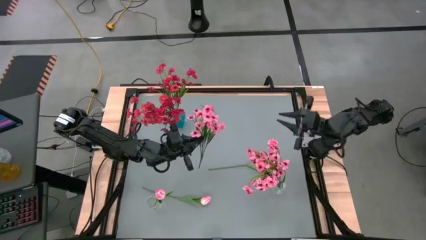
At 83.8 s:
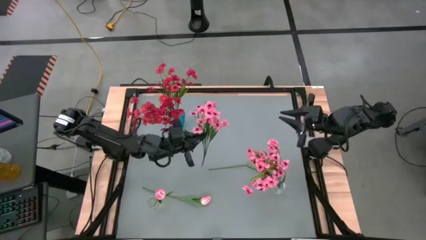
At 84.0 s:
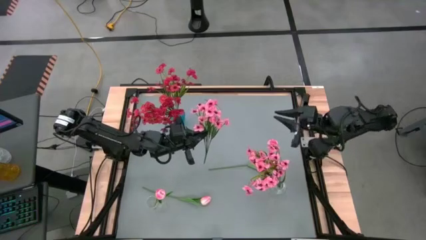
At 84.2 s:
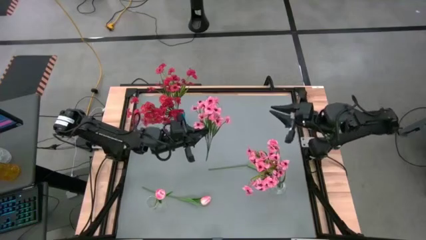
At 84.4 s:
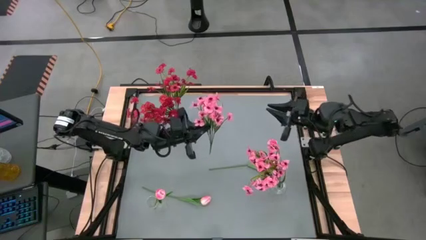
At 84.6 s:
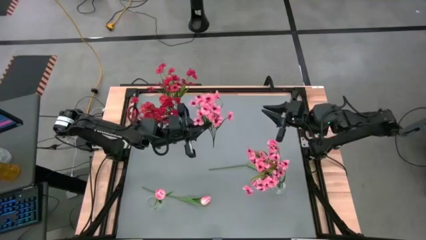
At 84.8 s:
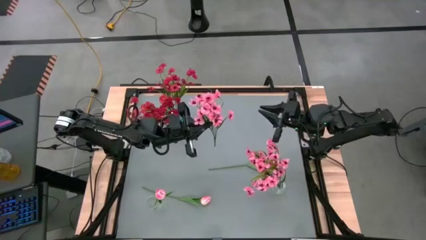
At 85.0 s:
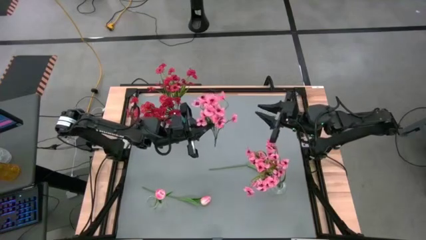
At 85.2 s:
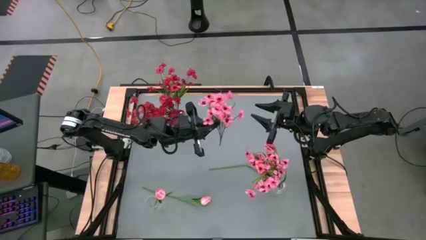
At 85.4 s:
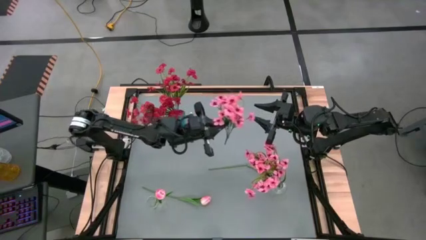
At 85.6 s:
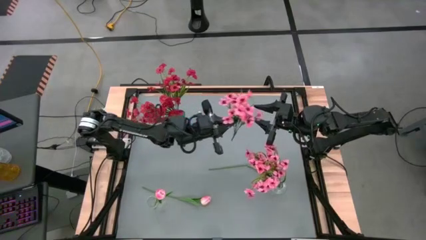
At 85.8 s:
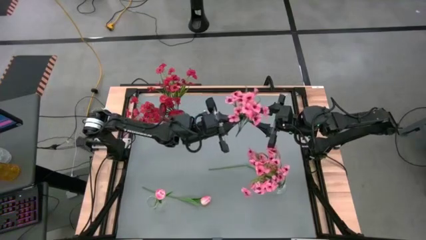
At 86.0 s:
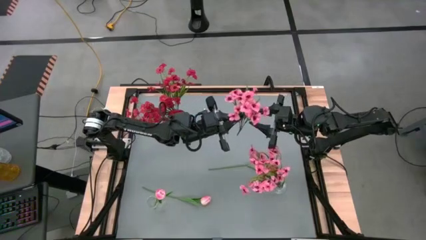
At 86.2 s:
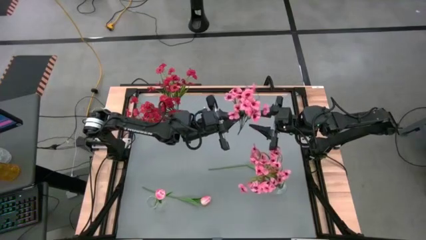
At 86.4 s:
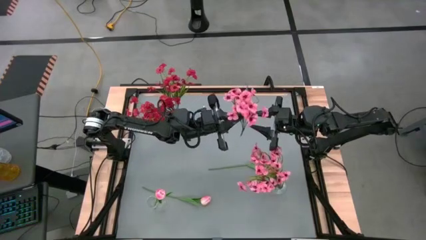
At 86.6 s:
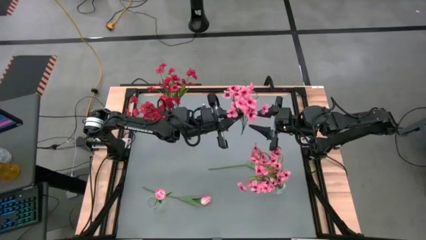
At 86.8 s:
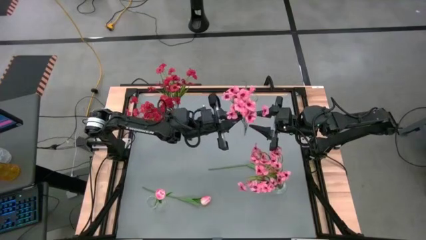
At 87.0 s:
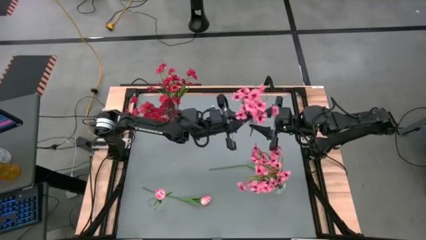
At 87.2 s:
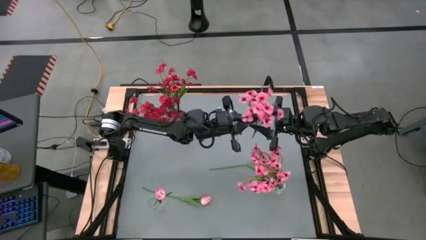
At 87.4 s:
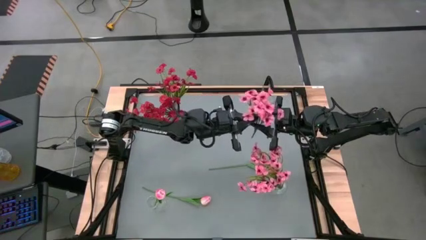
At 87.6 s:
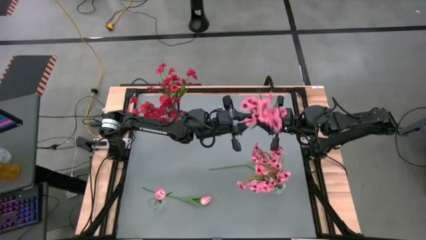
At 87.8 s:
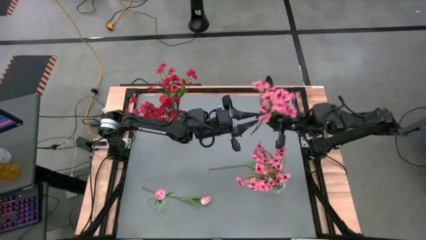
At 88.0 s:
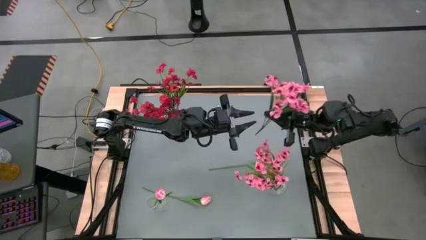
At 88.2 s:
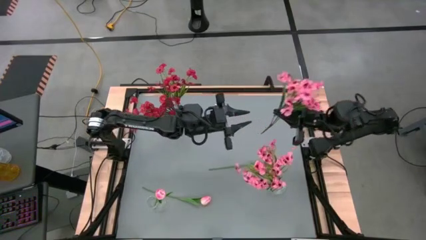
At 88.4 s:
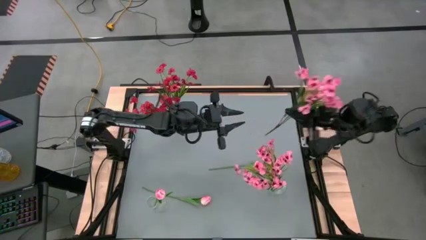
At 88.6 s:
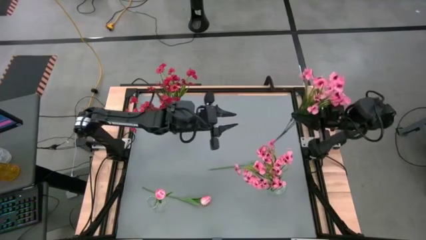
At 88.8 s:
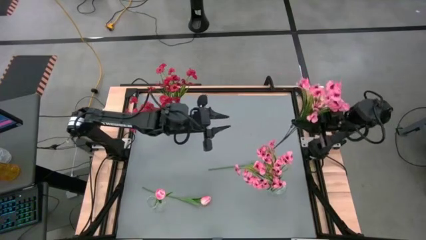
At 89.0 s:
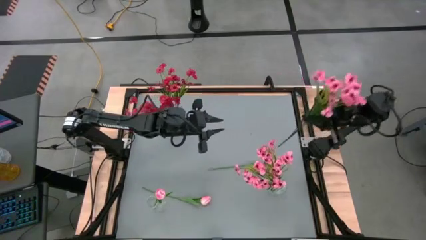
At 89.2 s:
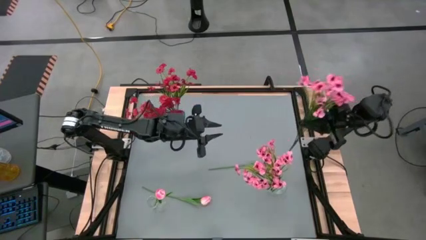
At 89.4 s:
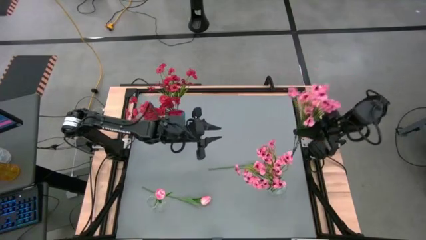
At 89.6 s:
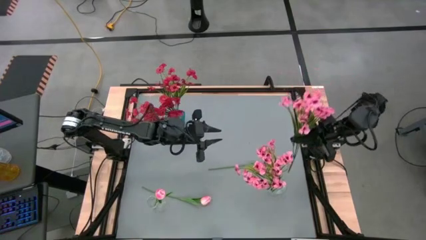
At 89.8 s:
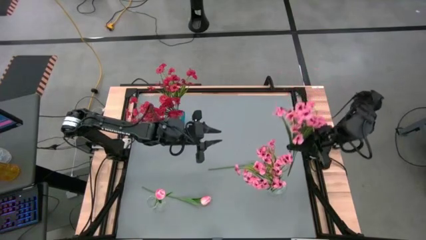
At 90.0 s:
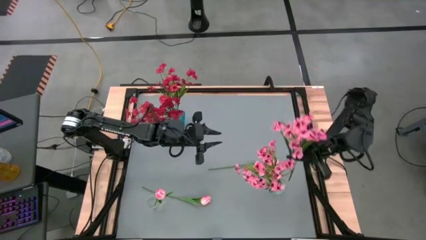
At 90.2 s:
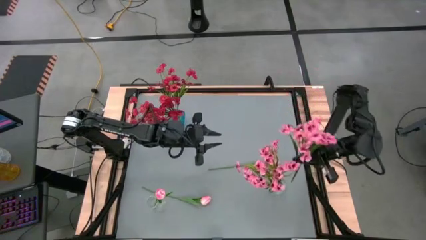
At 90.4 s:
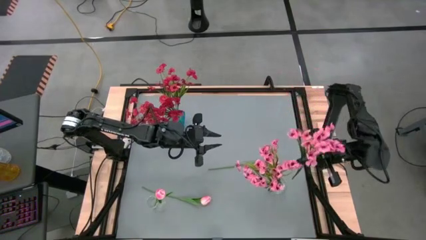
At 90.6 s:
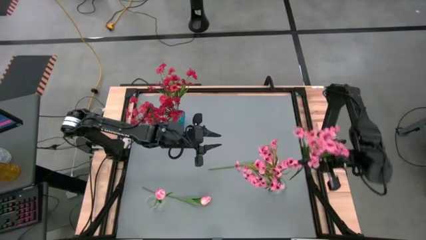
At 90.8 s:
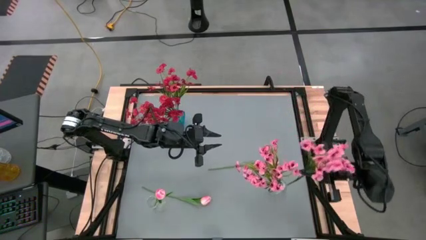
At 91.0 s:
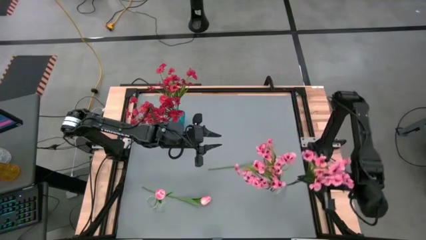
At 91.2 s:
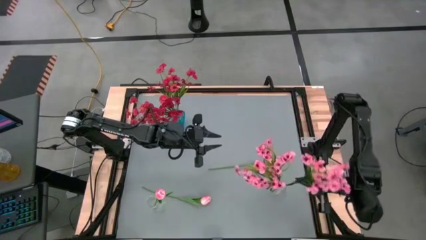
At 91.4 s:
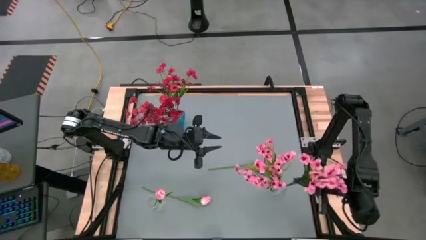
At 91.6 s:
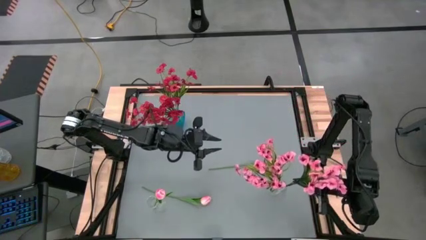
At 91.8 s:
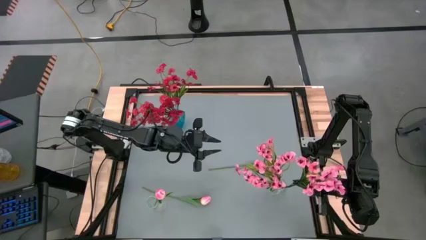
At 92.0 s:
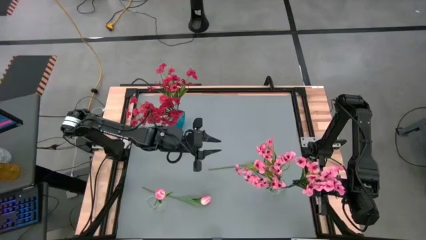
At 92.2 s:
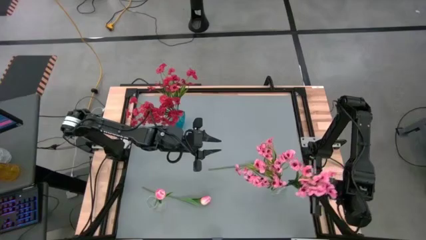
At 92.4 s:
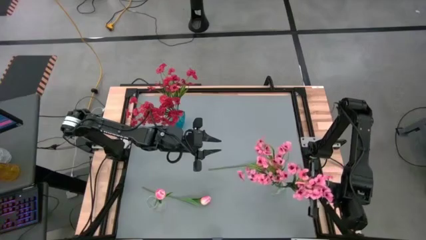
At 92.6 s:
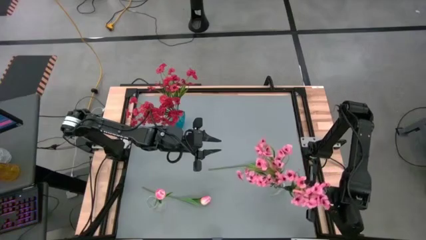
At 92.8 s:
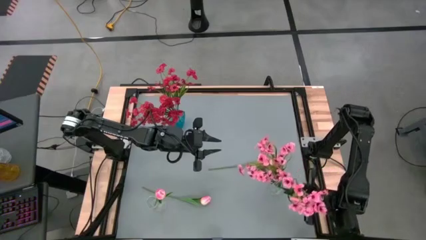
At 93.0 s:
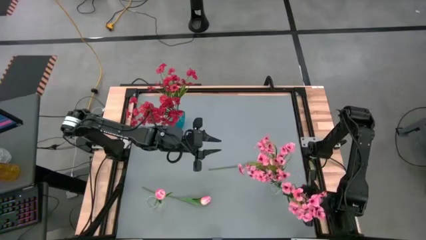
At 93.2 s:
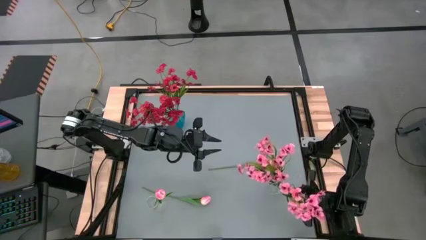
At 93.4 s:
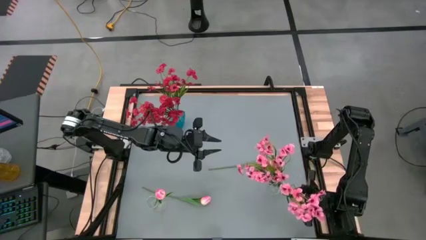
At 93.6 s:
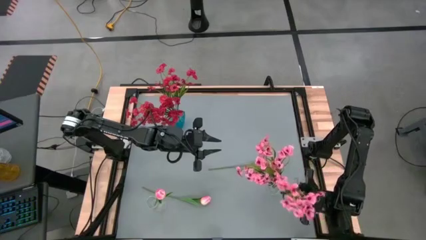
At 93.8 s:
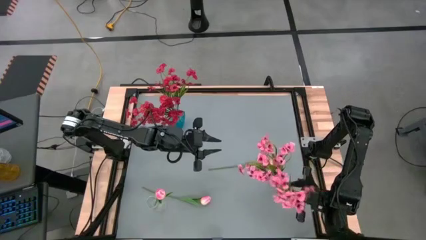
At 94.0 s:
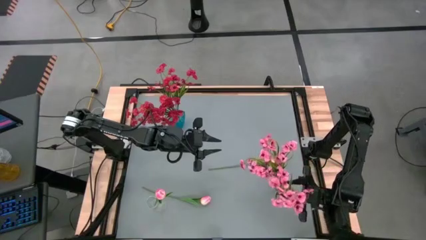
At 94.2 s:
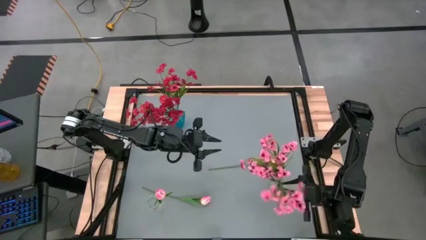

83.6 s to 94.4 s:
Task: Sort flowers into vase by color
Put the pink flowers into the transparent vase

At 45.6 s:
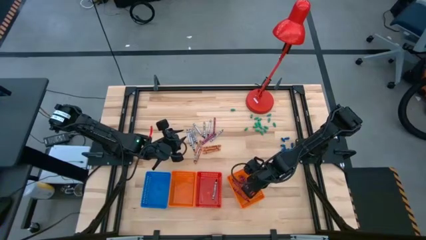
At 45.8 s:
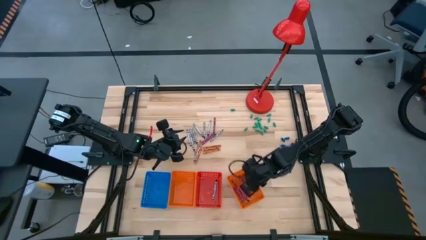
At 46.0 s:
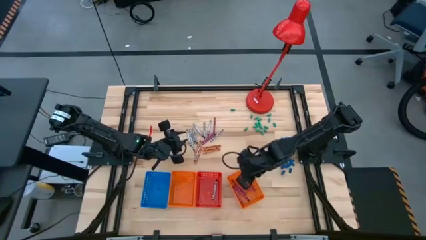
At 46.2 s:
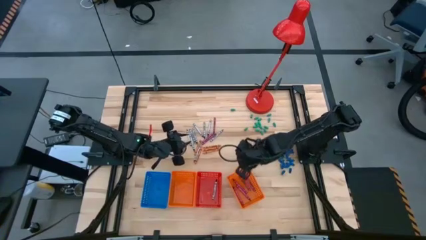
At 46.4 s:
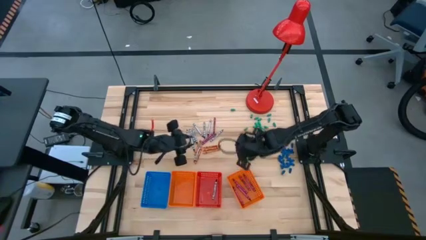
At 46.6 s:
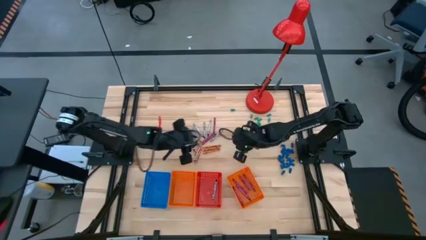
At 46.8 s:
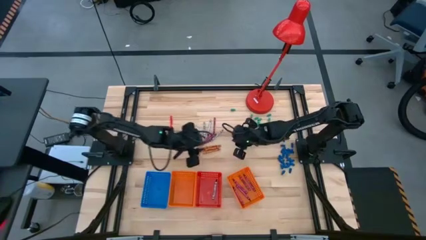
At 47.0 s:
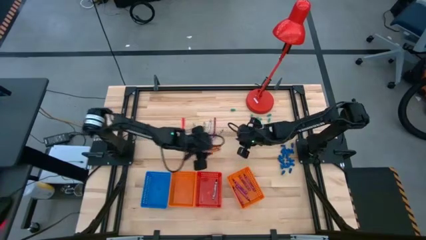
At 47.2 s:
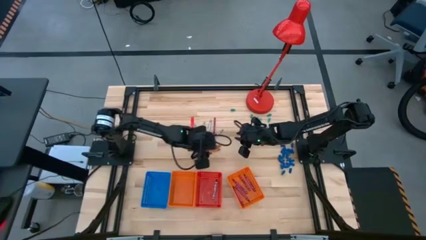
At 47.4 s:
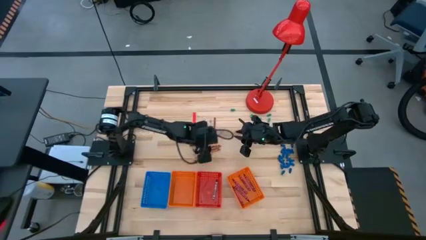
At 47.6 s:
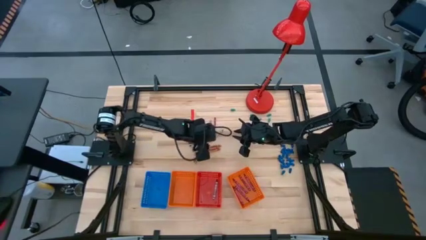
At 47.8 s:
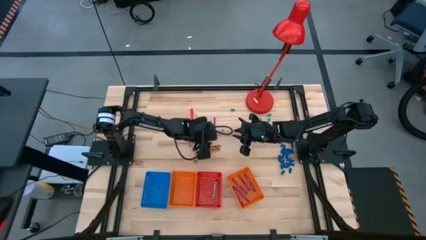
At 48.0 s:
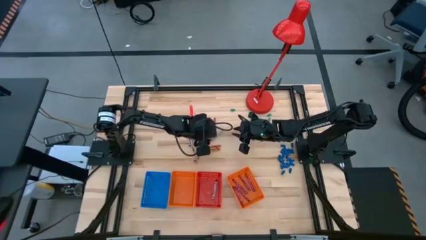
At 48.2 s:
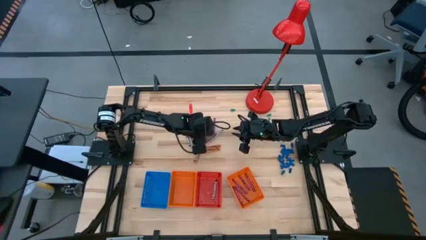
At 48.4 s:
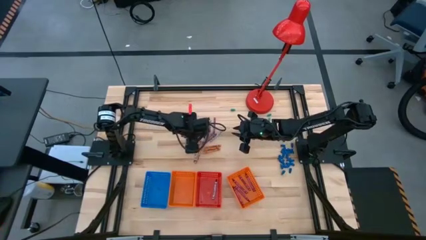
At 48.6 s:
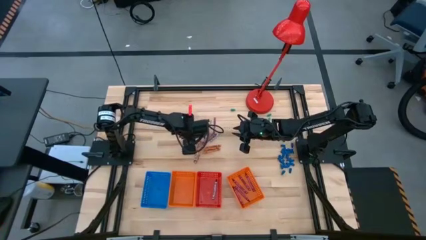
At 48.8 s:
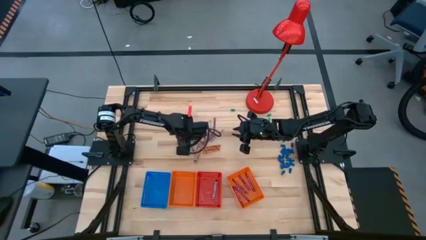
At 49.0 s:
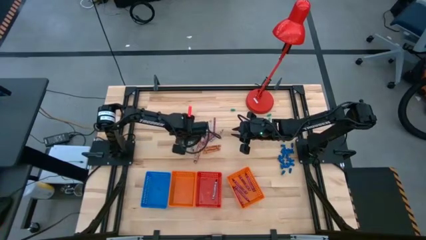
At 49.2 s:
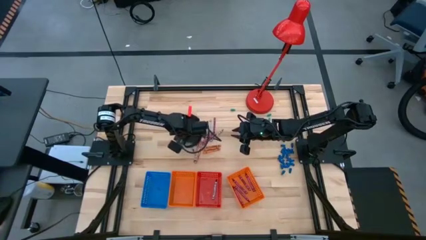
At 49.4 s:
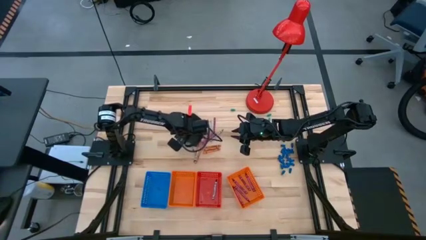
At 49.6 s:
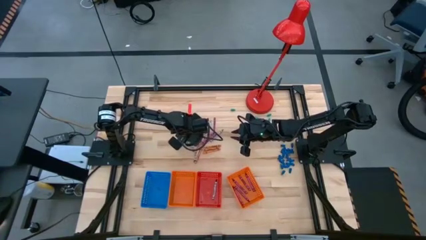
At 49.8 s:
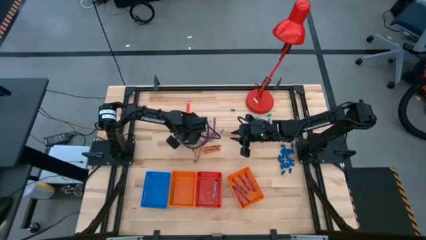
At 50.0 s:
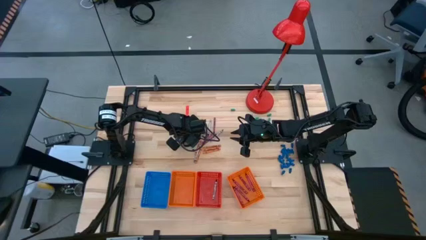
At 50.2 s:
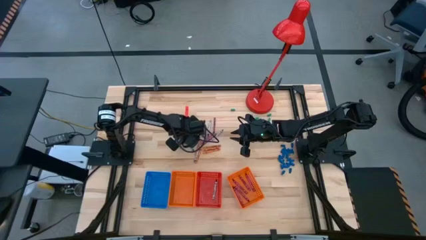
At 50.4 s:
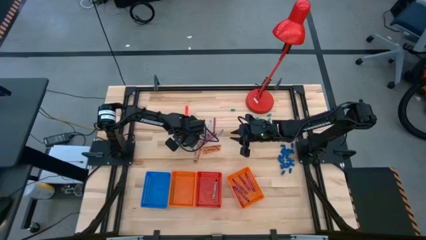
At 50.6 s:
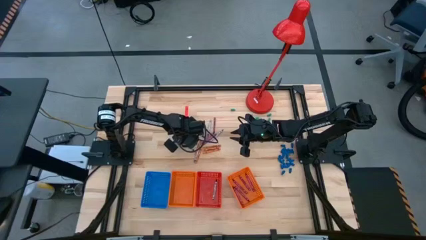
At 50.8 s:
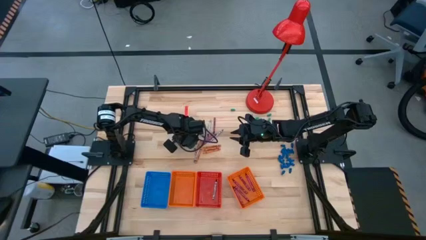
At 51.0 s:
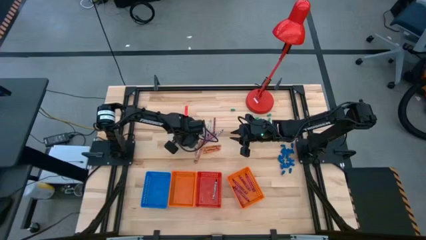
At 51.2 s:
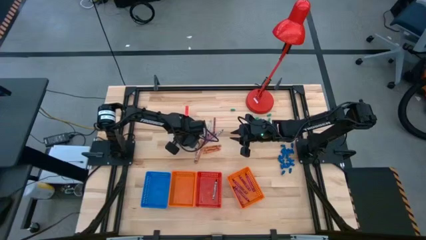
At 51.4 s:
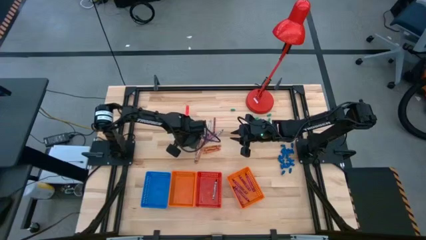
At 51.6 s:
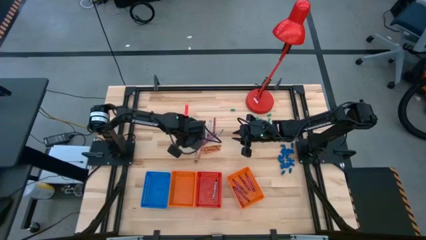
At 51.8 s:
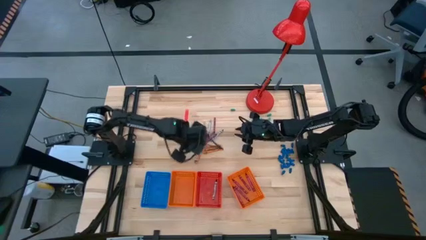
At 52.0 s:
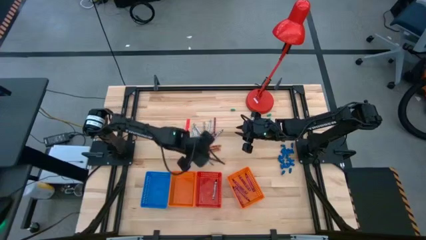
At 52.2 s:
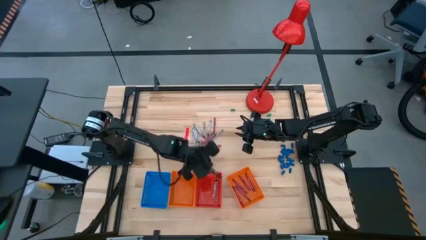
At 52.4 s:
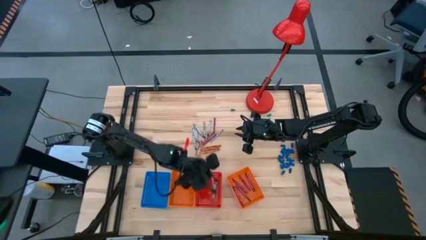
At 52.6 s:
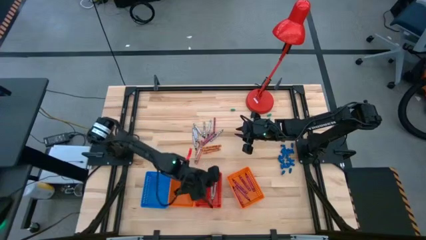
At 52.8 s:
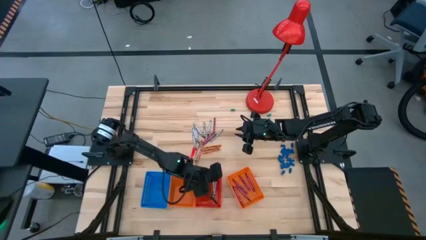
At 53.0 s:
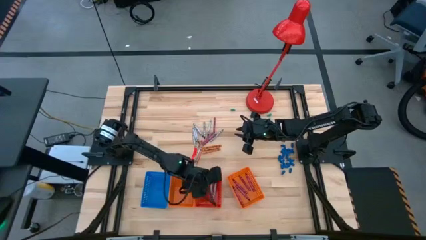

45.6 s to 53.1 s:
Task: Sort crayons
Put the black crayon into the red bin
